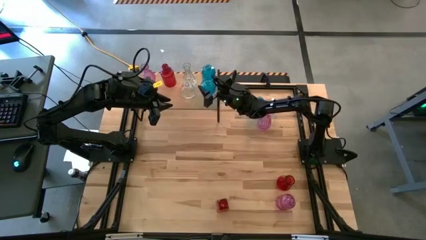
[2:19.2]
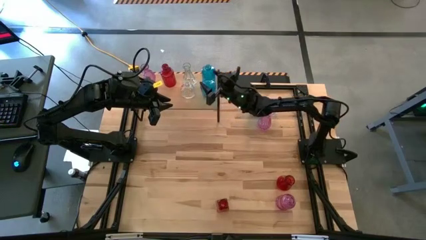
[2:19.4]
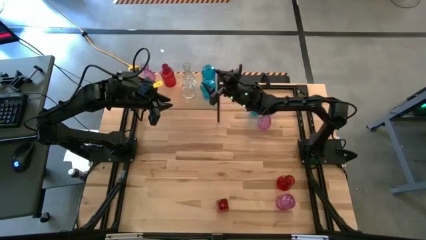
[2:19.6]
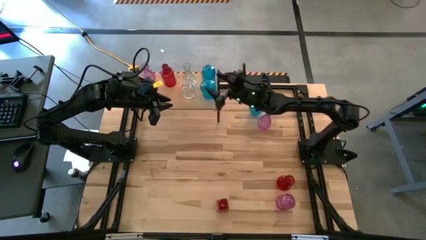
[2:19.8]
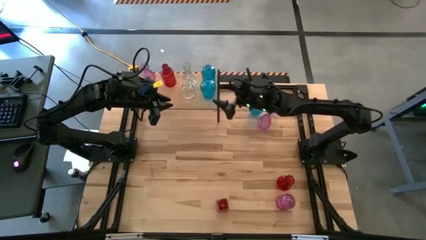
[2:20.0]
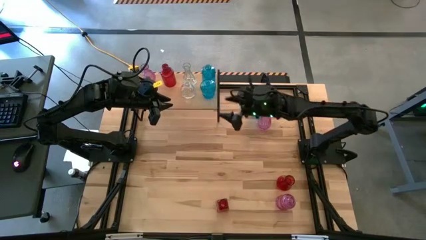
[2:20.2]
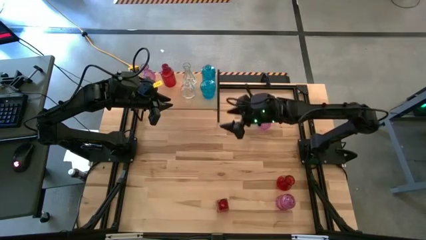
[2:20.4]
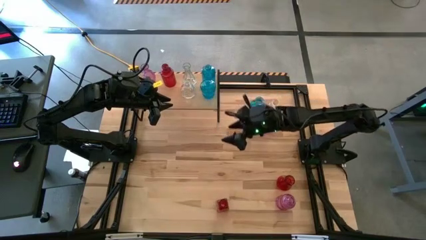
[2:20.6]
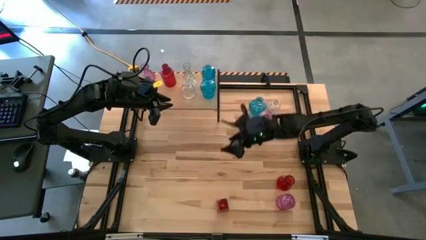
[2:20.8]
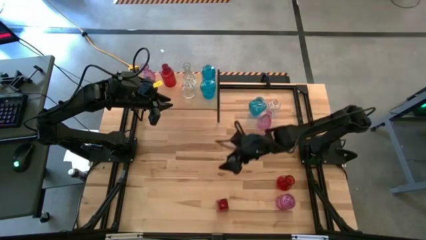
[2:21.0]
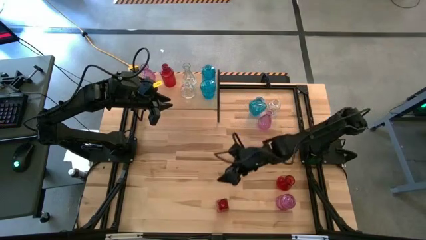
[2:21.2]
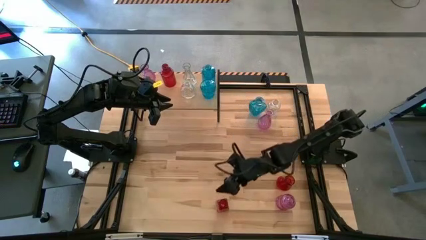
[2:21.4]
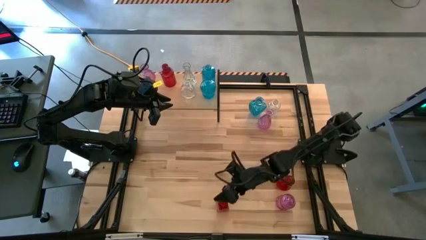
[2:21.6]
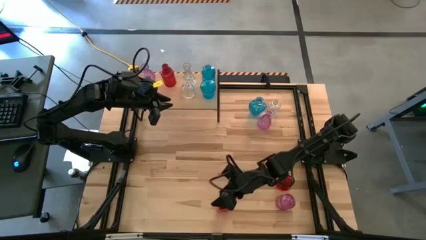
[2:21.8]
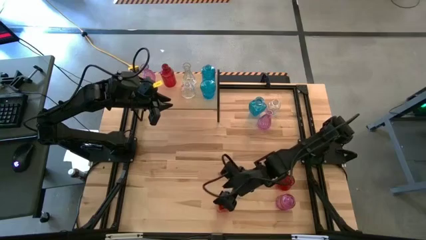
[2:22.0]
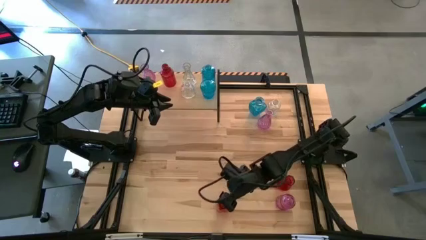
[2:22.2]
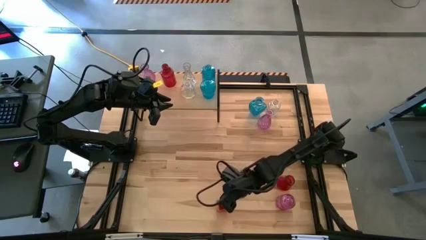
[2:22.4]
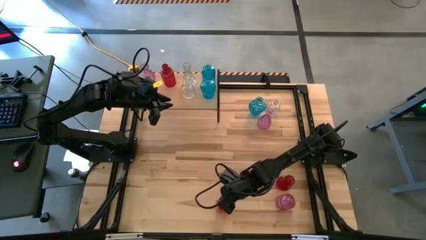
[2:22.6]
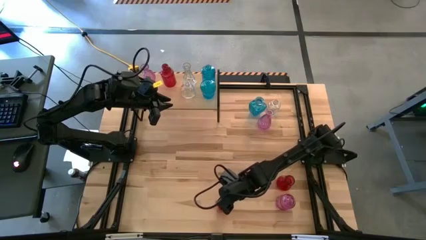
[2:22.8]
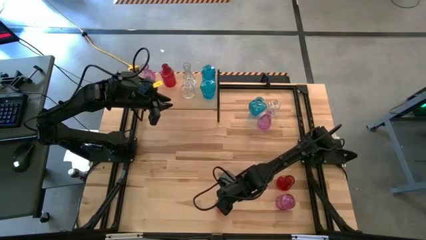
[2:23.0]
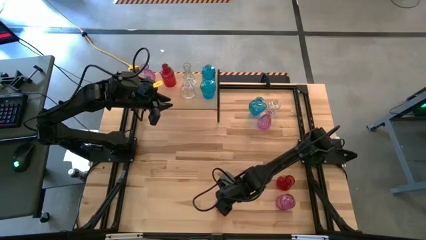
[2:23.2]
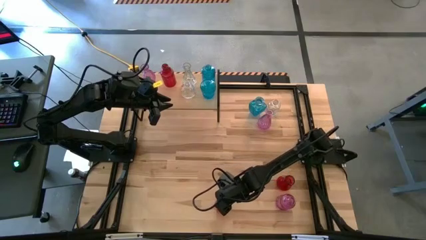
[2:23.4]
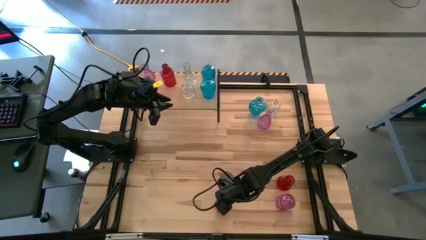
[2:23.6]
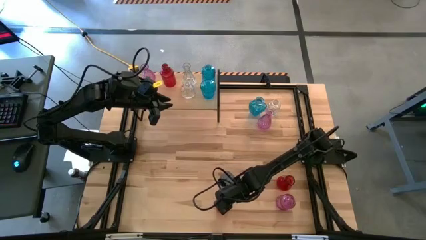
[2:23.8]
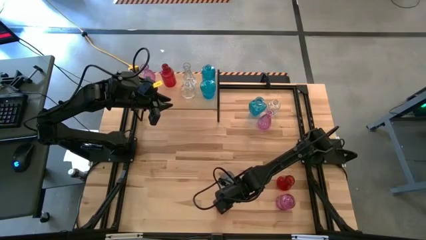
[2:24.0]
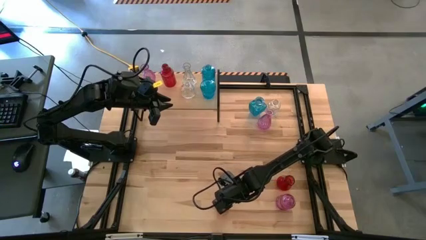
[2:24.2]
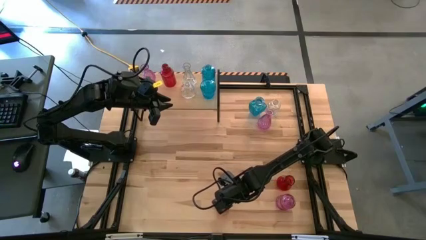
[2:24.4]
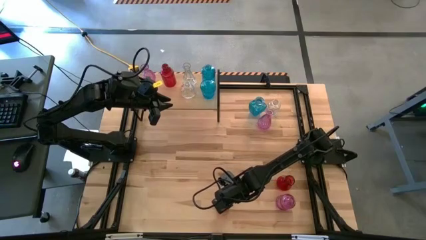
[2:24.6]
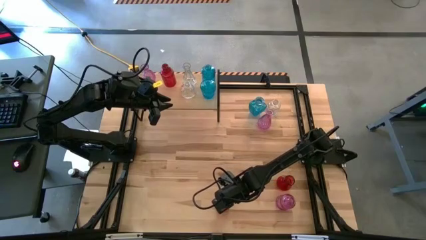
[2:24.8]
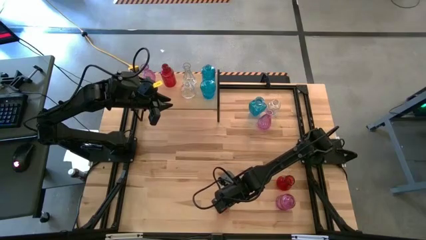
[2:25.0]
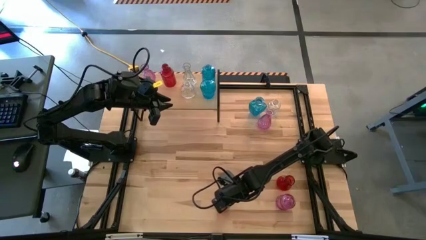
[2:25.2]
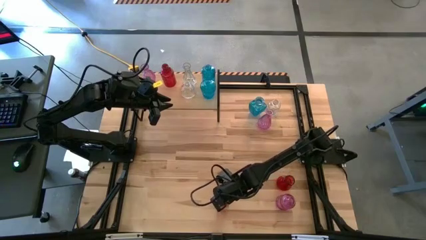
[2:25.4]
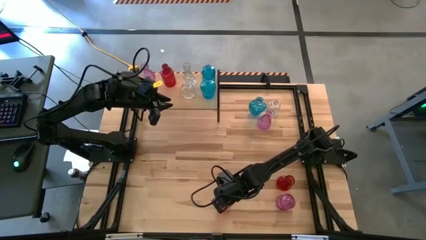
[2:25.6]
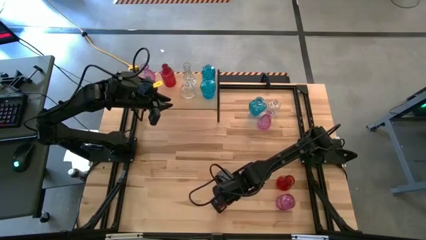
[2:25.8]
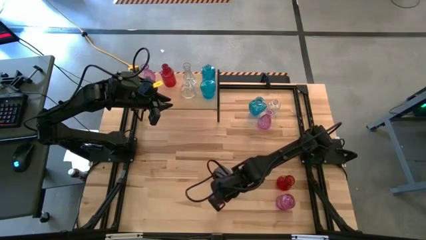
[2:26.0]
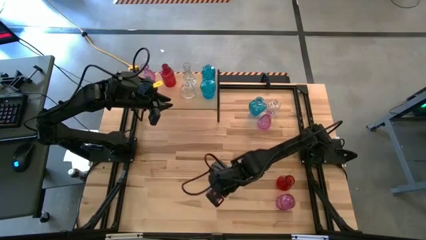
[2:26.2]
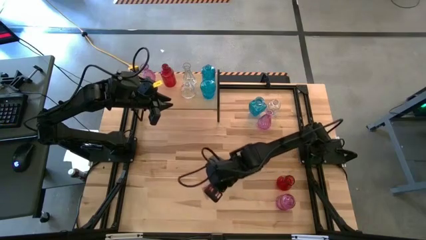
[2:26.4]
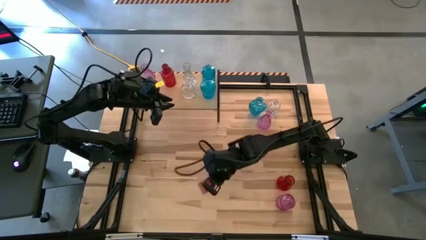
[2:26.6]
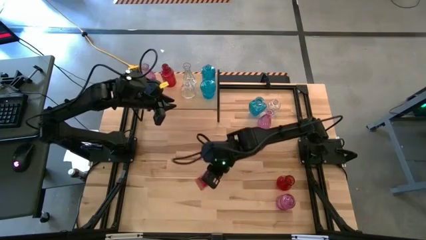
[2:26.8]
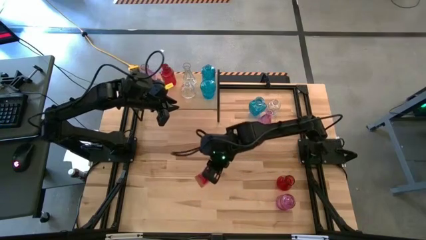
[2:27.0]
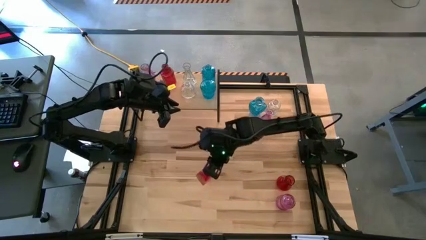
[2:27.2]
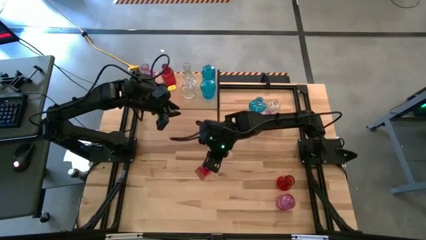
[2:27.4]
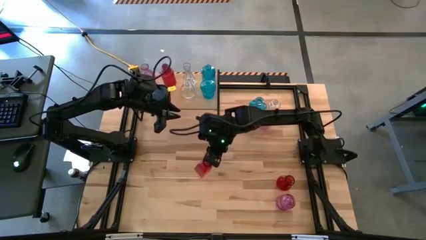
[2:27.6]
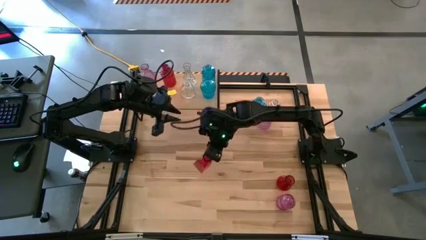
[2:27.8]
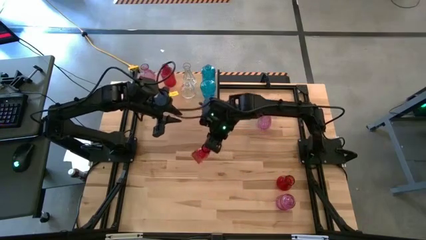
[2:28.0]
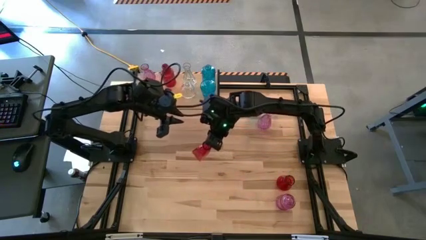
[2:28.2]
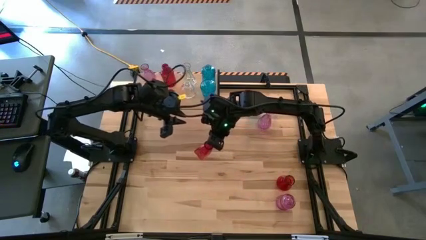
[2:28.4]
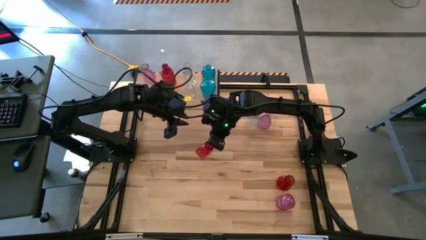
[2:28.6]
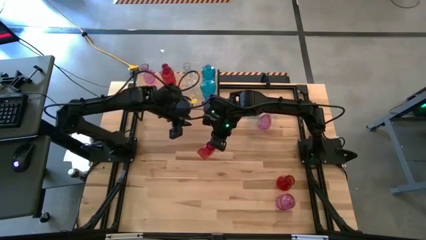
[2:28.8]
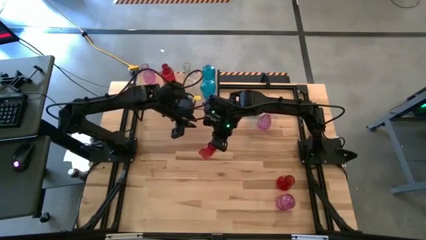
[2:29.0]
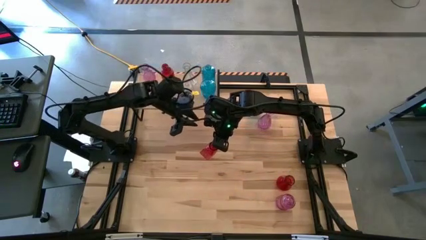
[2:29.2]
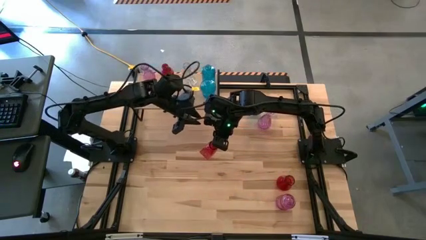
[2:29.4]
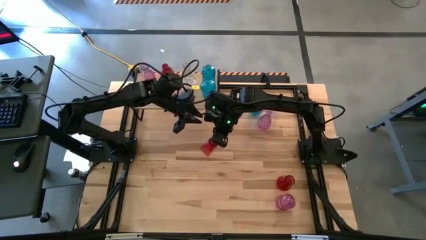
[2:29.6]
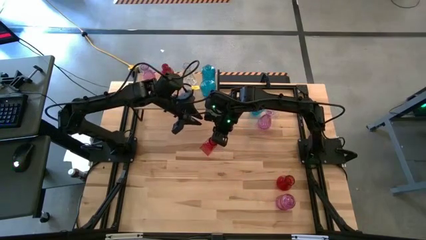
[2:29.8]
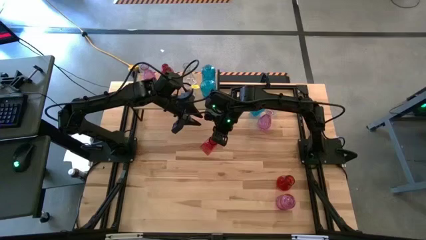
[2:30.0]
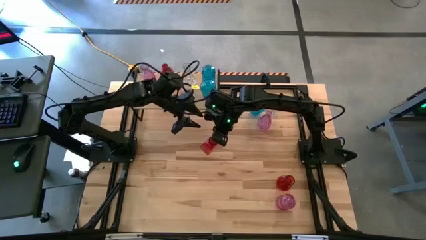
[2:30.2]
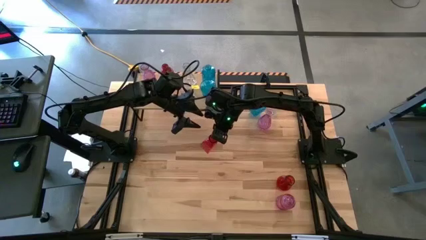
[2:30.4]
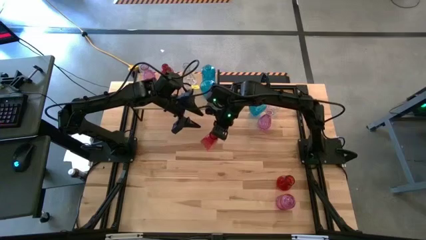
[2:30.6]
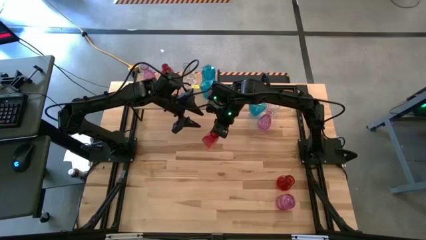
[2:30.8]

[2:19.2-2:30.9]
Task: sort vases onto shelf
Put the left red vase on the shelf aligned with the other red vase

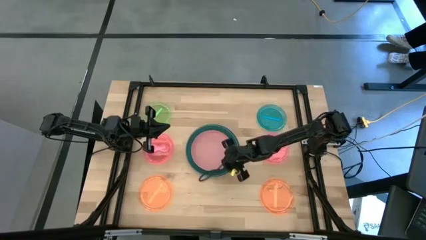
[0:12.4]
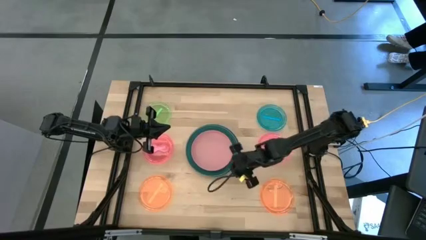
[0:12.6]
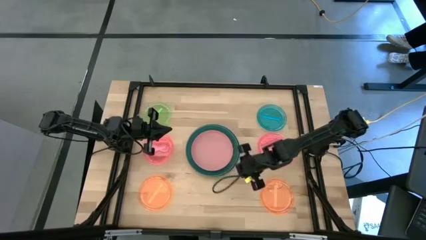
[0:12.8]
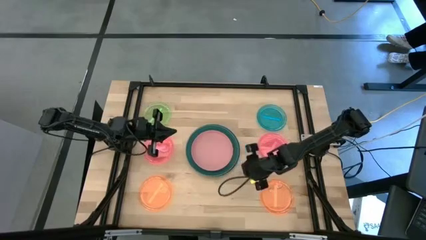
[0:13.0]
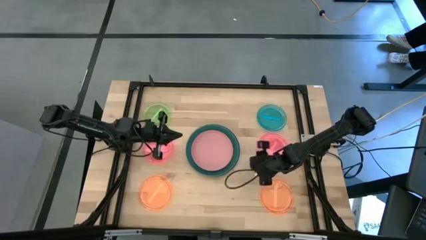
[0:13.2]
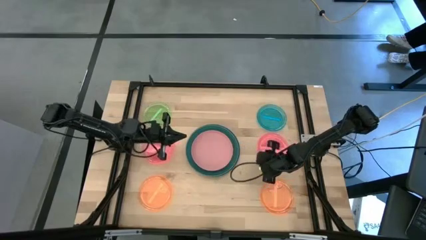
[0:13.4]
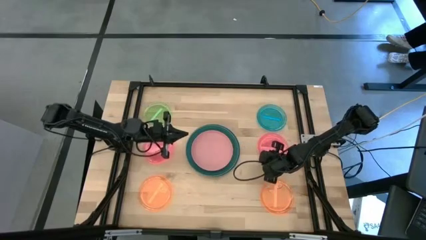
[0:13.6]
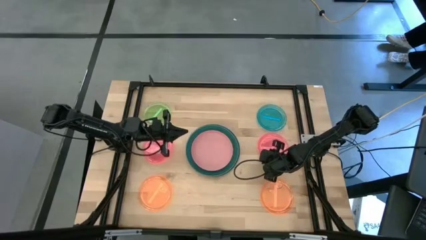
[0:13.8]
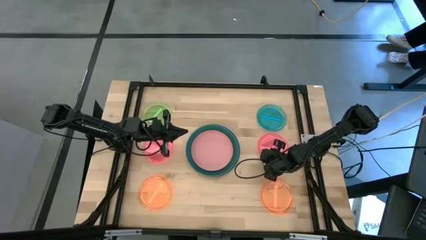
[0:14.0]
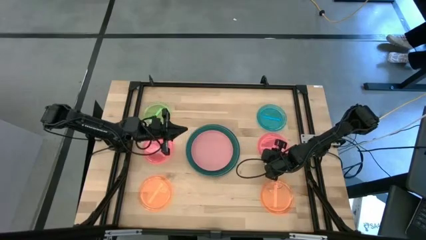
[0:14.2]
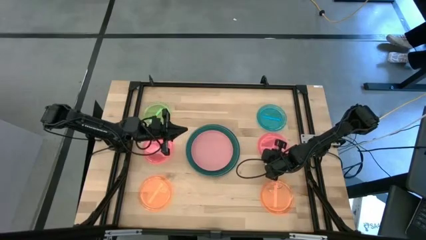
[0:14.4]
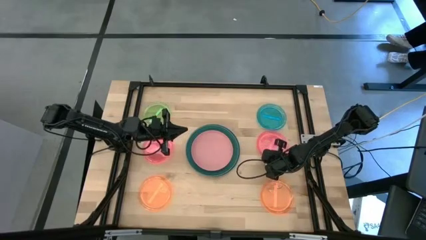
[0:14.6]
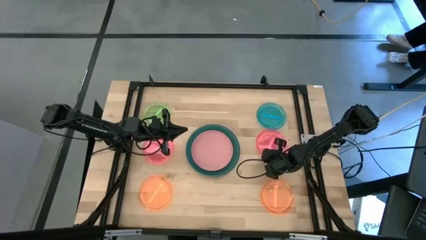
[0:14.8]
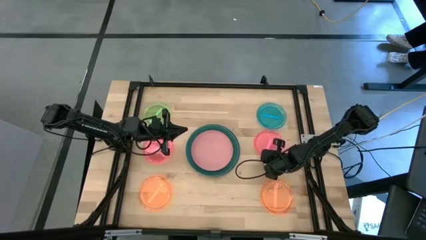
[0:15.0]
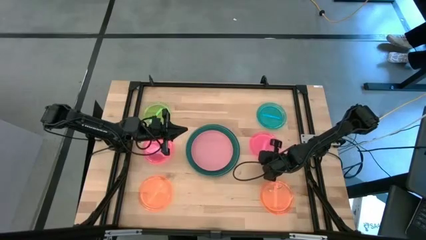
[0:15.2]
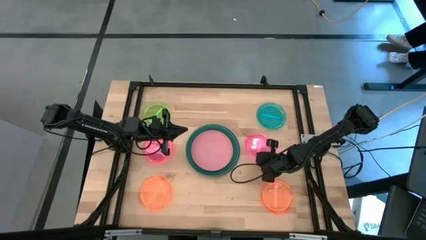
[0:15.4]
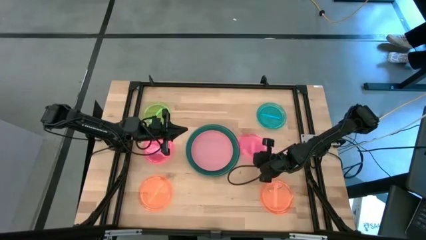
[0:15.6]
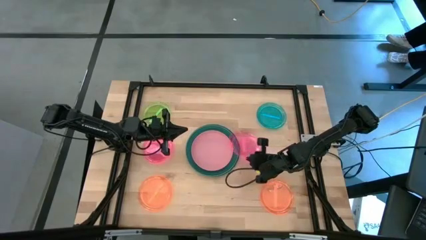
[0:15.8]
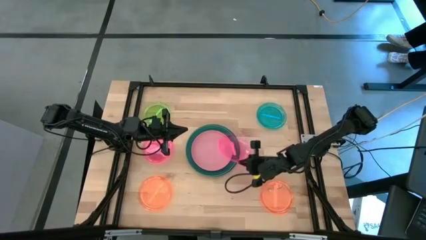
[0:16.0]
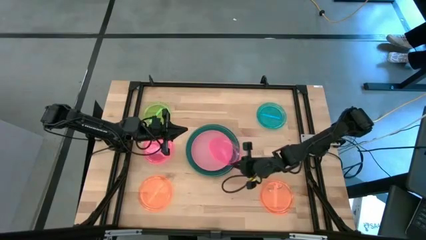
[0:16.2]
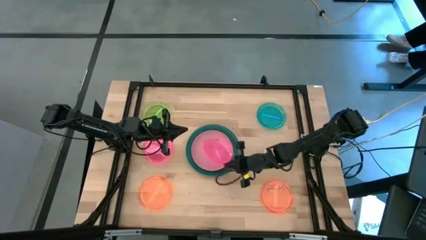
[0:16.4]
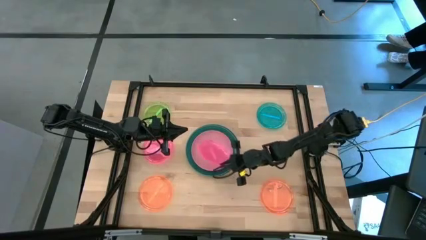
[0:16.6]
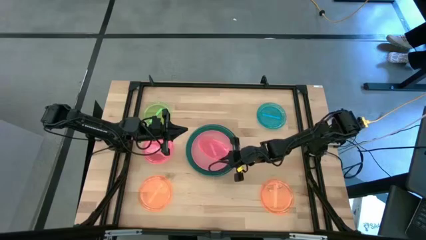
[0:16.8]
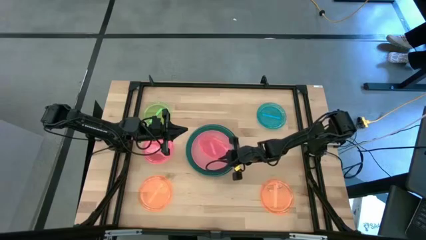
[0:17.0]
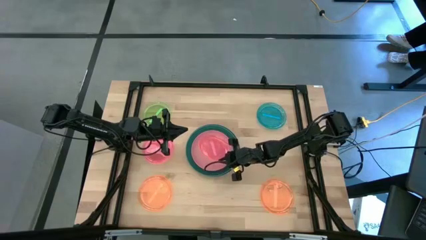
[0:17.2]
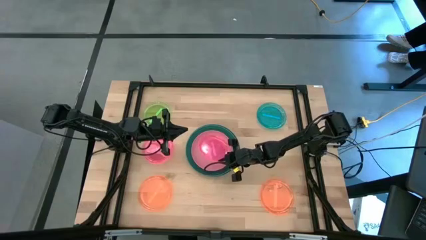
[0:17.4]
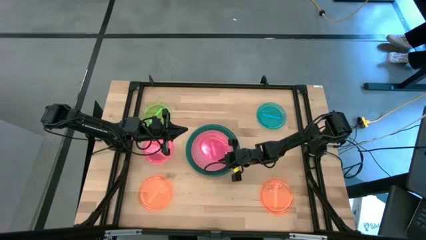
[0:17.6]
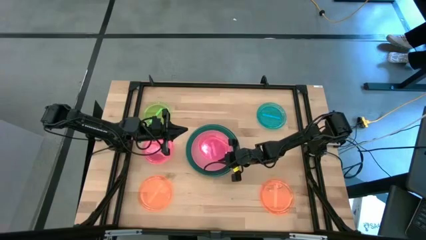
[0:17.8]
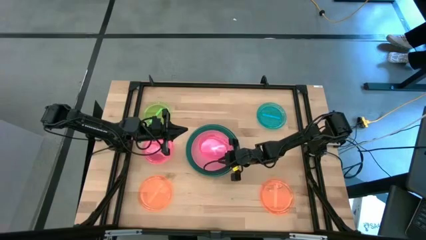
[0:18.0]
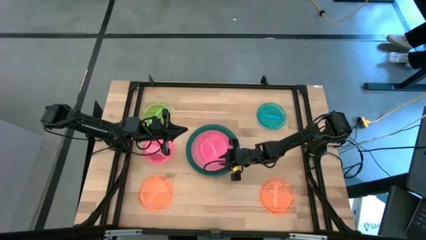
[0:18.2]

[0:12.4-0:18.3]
Task: Stack plastic plates
Stack the right light pink plate on top of the pink plate
